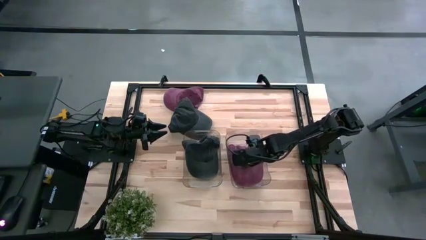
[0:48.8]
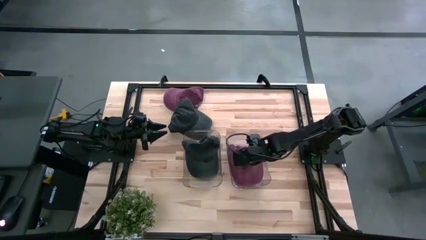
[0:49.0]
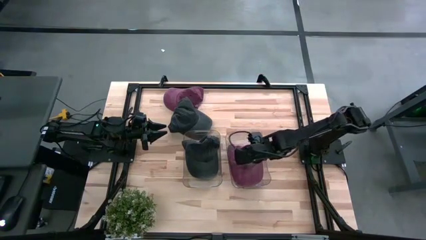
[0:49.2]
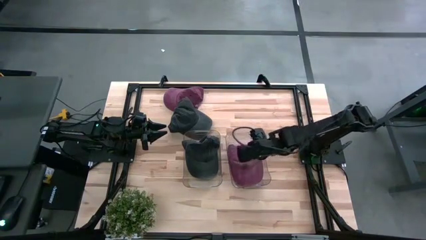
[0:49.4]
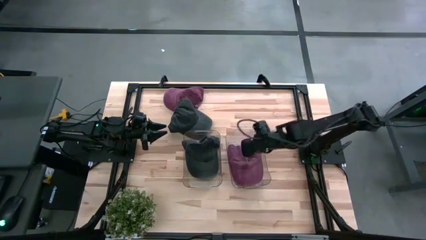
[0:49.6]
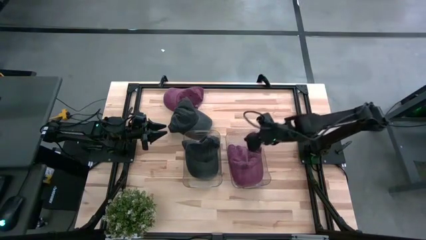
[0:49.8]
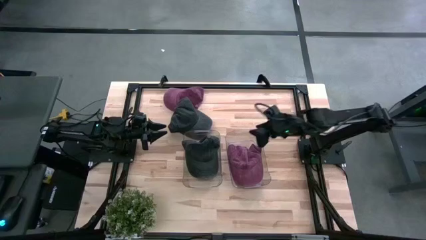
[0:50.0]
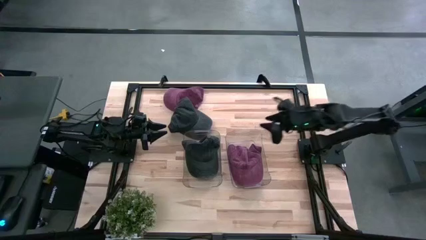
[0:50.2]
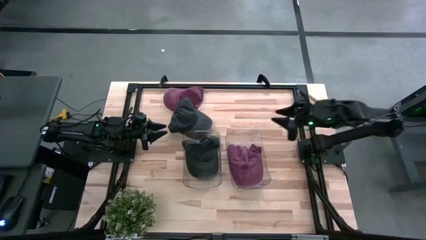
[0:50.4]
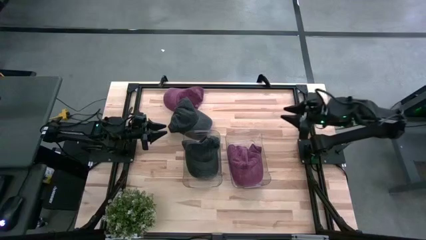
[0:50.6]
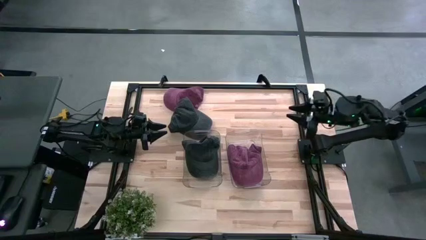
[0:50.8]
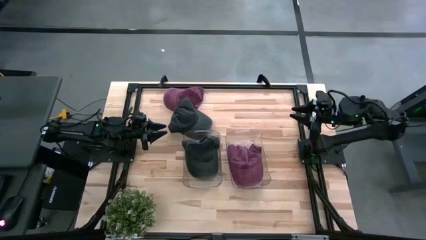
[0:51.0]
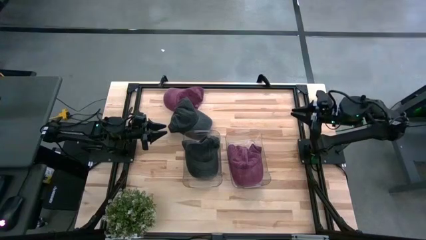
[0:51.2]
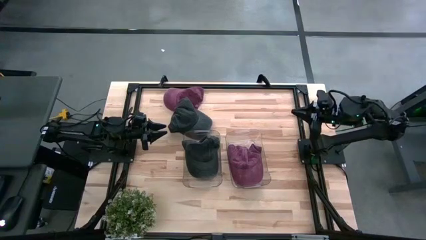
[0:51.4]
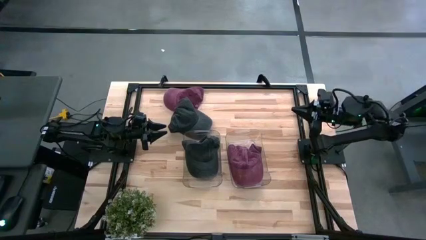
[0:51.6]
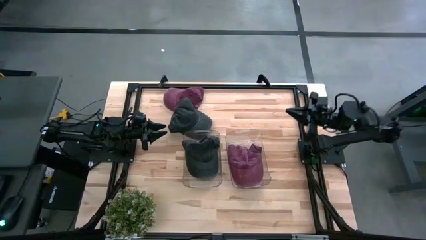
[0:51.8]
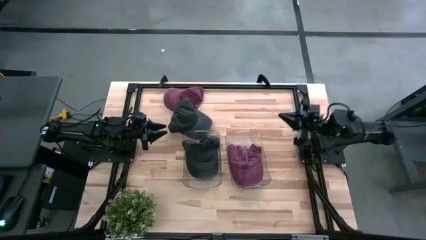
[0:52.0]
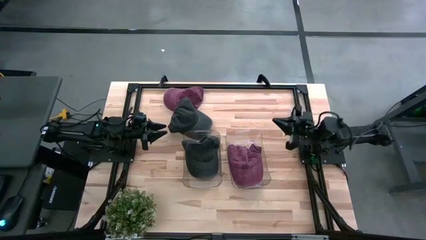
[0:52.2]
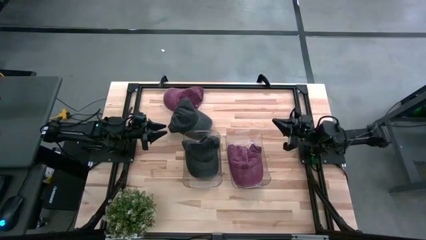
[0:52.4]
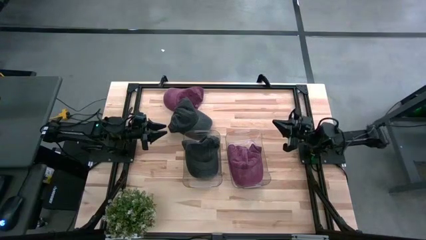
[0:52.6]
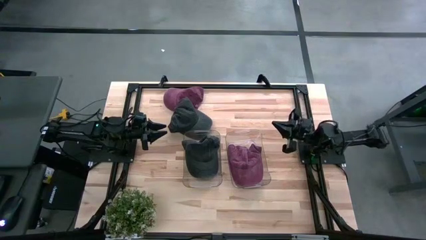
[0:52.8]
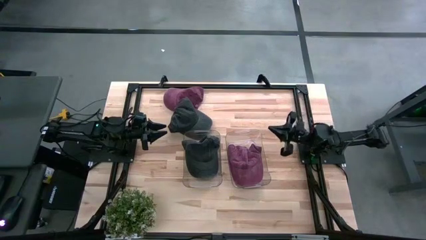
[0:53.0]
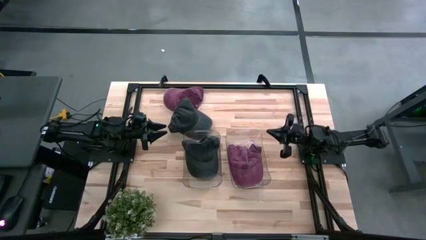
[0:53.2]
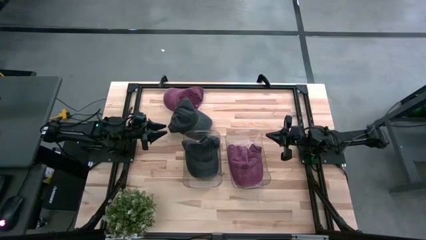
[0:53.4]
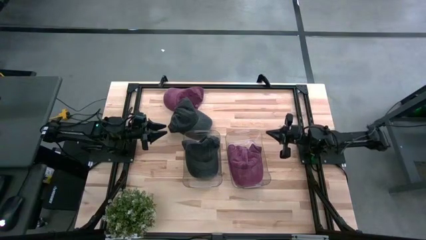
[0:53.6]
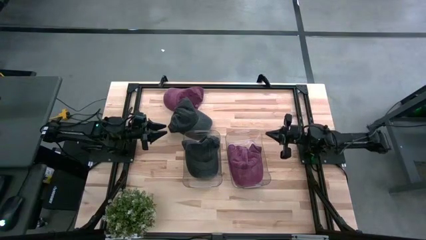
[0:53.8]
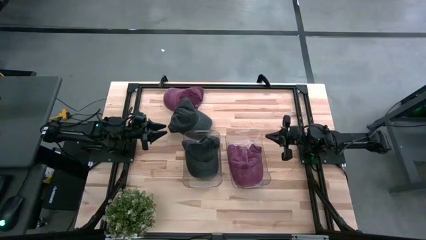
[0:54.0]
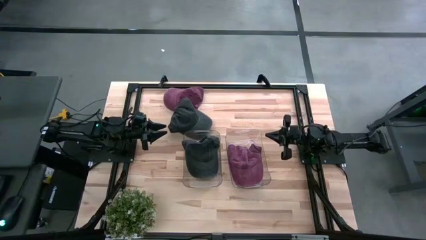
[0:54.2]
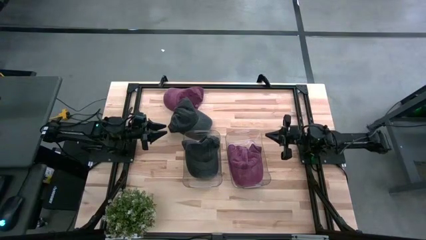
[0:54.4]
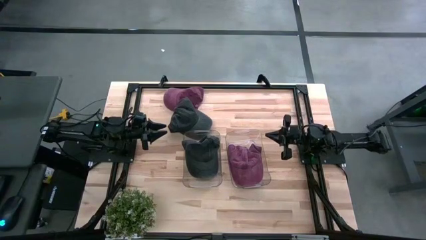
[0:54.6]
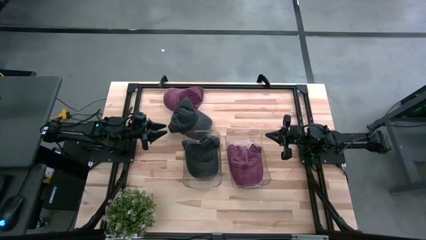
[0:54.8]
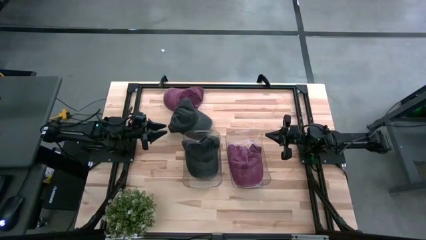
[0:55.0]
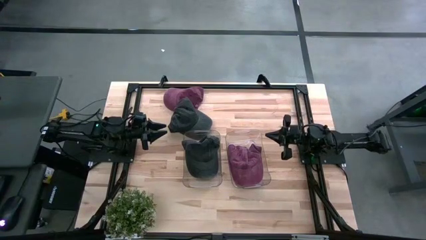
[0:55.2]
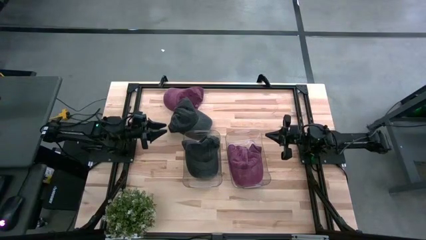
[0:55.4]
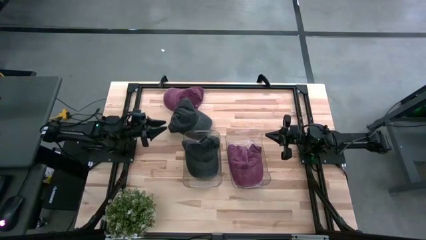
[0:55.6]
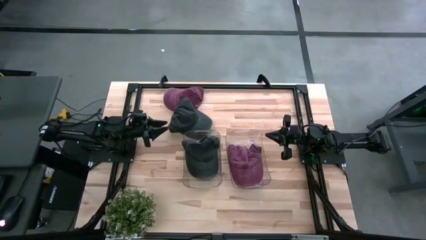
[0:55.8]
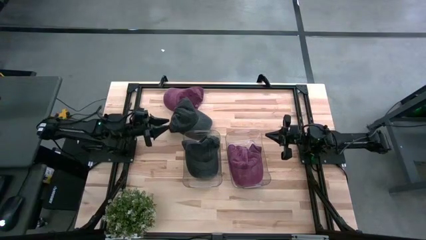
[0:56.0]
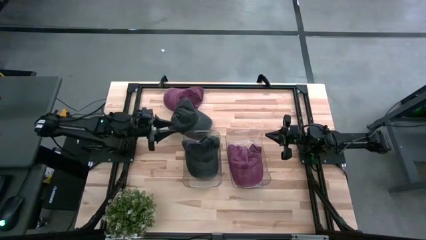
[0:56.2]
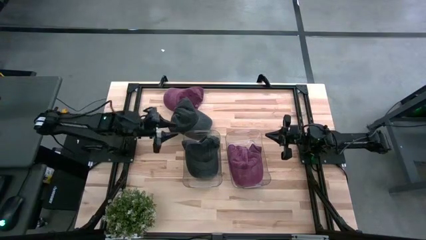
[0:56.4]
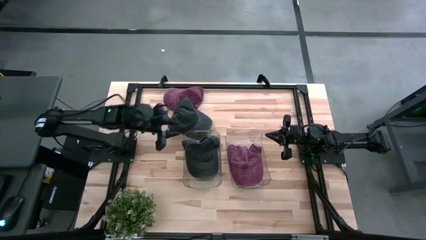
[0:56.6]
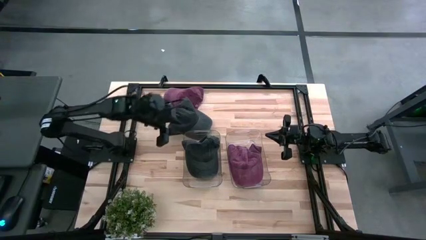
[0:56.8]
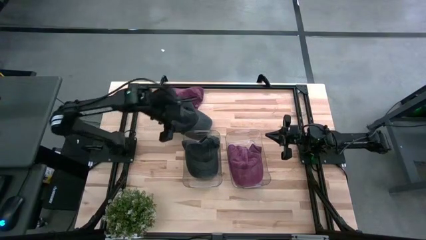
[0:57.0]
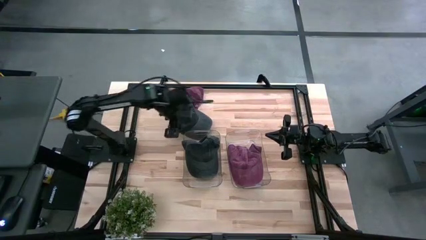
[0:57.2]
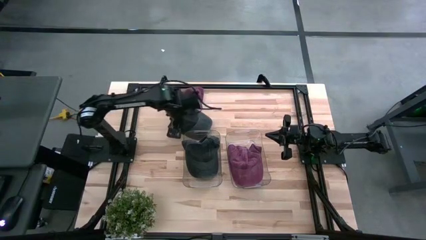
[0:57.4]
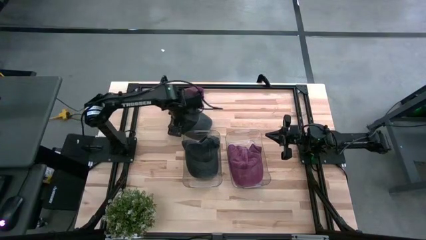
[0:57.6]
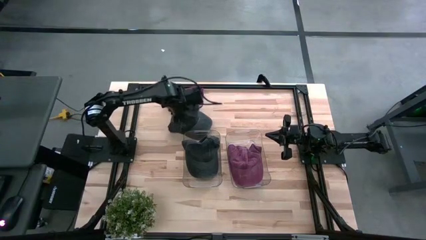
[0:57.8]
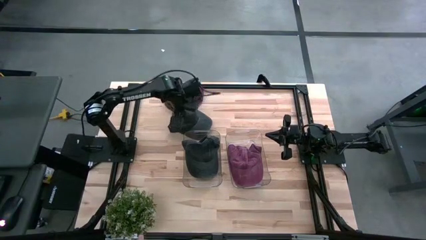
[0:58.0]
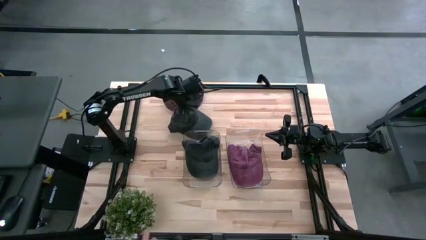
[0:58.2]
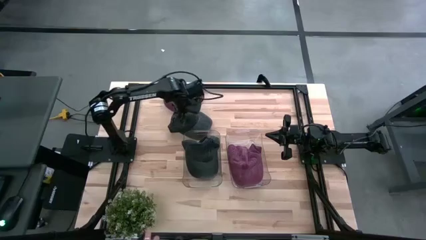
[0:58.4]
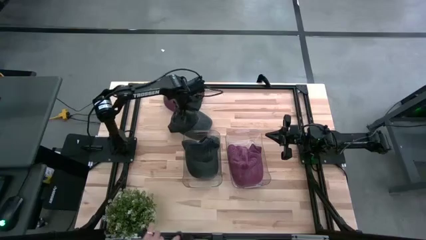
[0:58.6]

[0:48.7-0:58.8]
Task: Pick & Place hat
Put the black cap into the left transparent bin

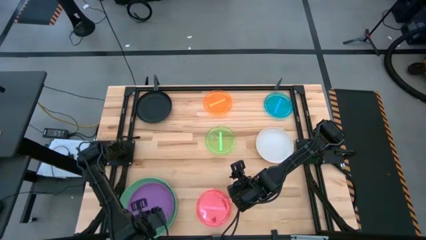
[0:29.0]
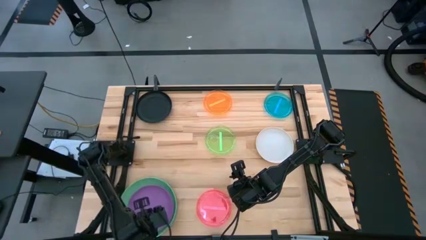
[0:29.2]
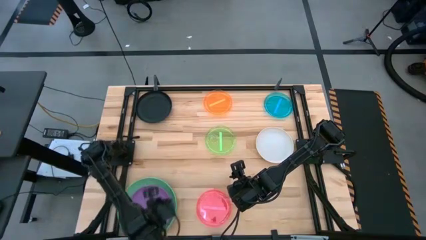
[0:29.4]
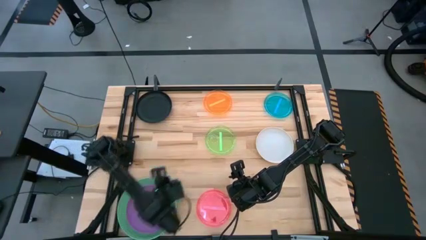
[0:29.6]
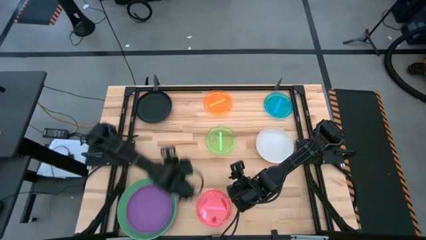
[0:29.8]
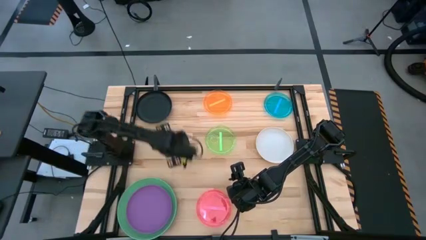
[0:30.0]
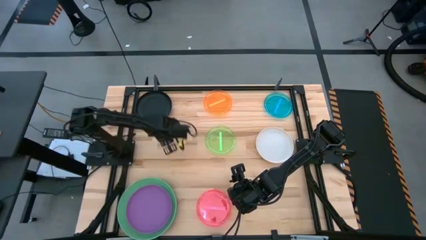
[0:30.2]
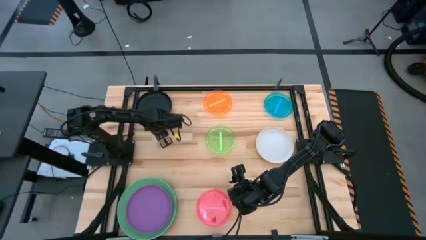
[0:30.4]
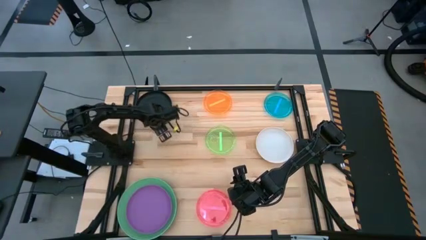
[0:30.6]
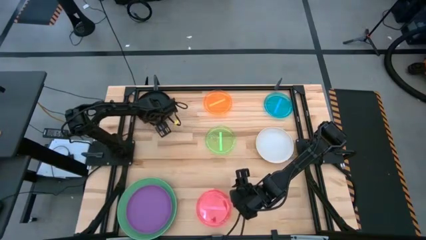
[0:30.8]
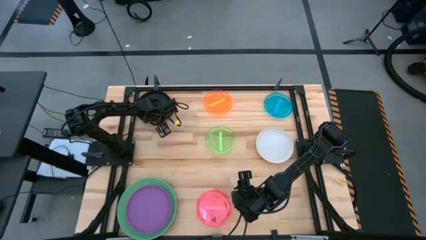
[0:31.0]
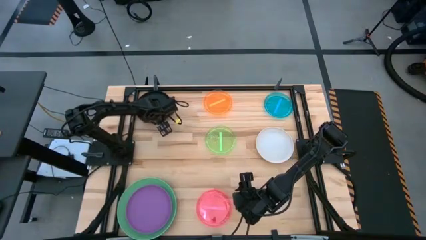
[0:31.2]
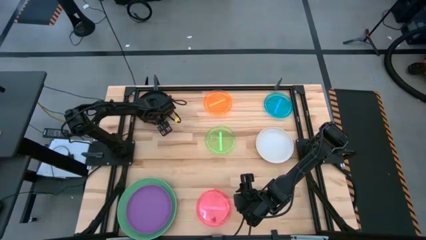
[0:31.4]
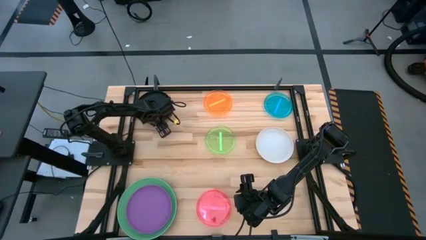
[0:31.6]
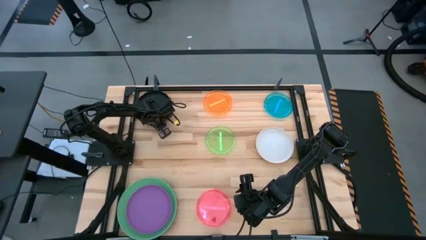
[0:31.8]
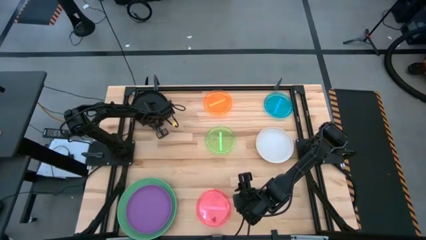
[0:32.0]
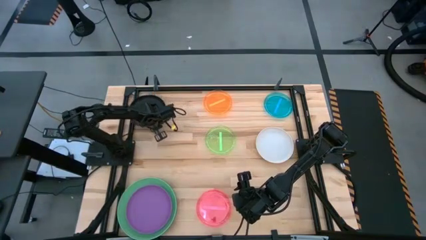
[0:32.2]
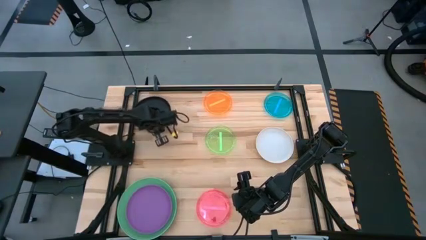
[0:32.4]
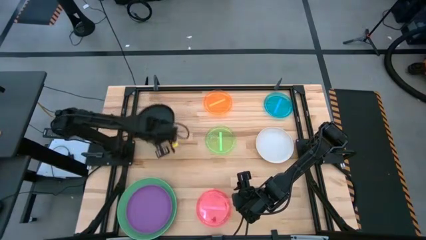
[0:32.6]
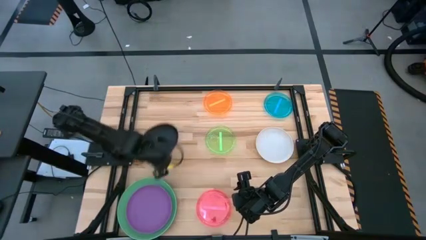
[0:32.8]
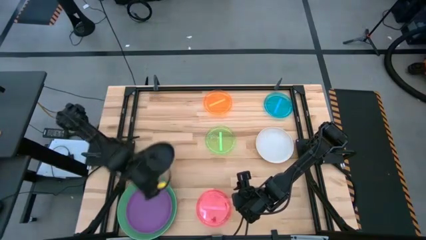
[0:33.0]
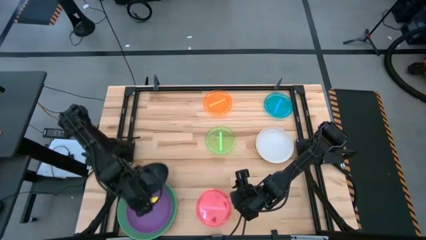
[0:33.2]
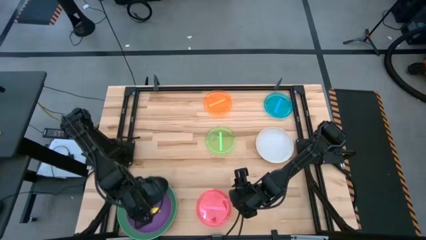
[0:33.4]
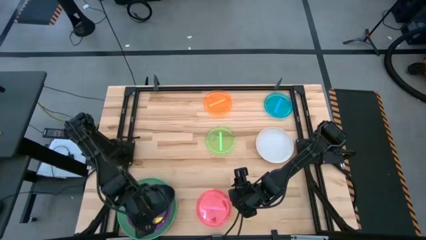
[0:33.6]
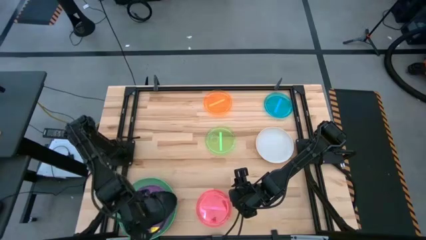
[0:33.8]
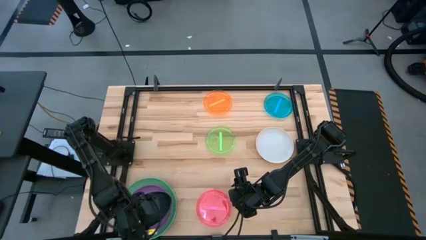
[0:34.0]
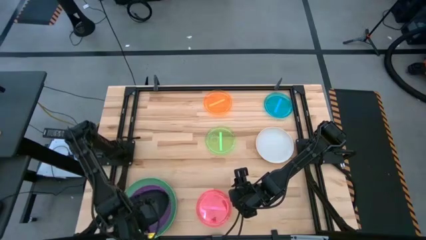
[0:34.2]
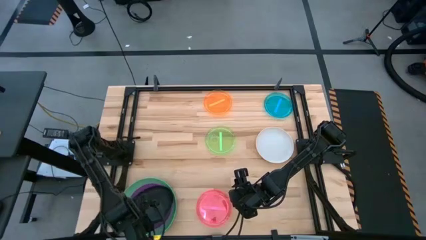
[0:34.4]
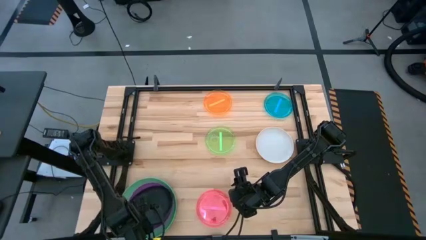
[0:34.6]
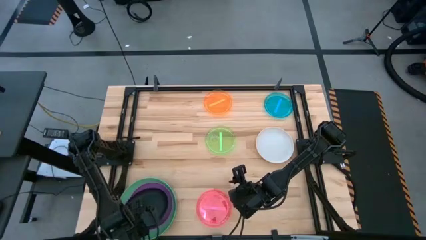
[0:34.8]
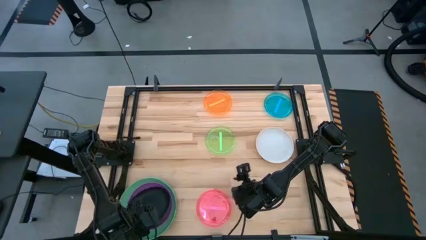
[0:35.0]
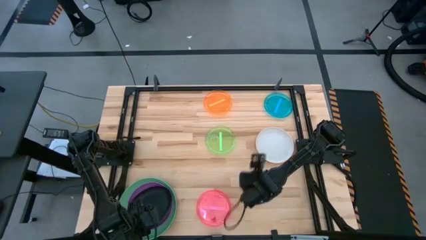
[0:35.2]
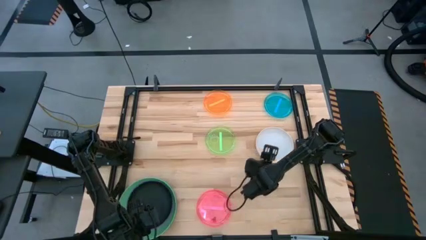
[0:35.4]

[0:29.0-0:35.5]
Task: Stack plastic plates
Stack the black plate on top of the purple plate
